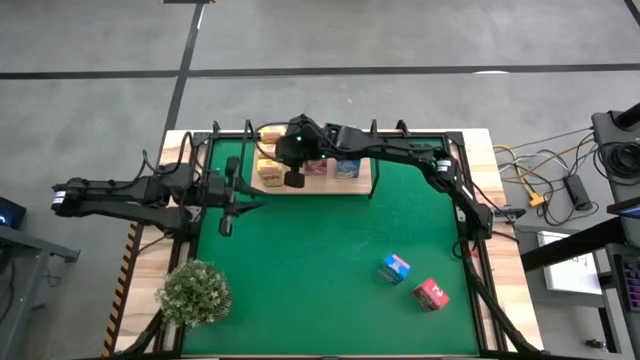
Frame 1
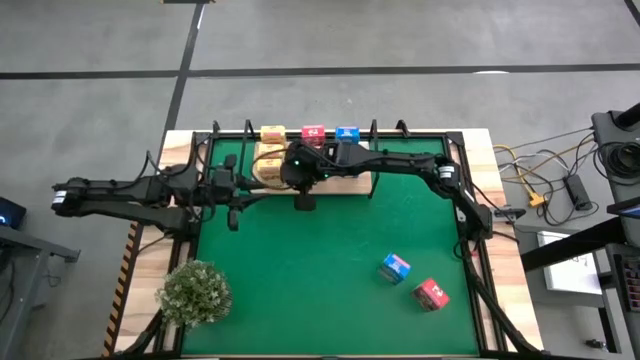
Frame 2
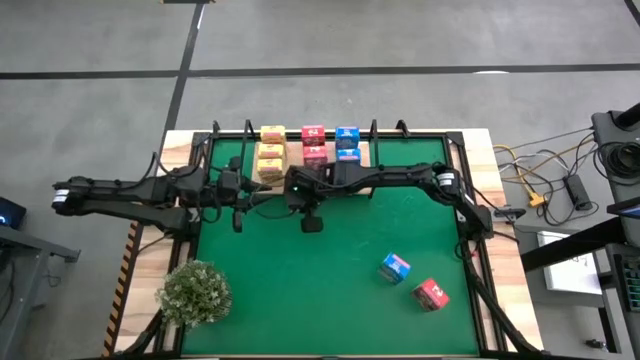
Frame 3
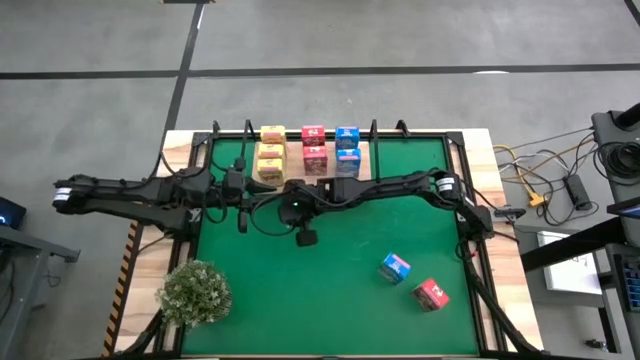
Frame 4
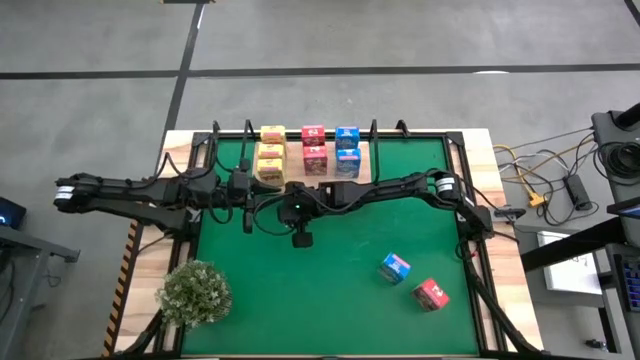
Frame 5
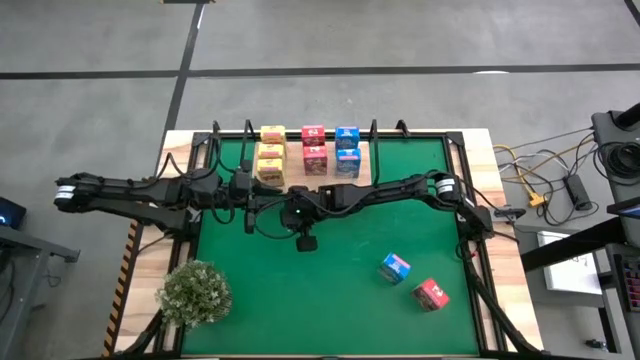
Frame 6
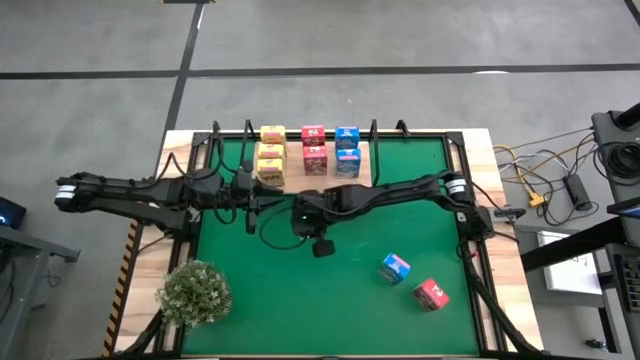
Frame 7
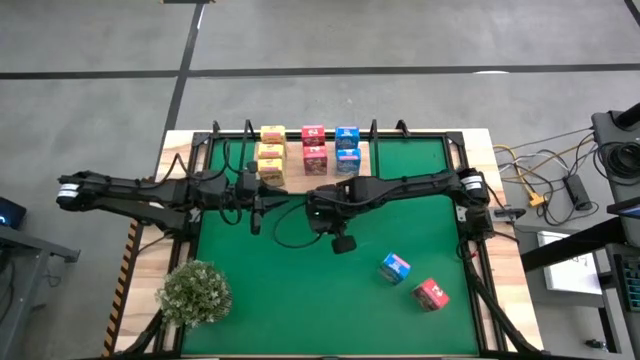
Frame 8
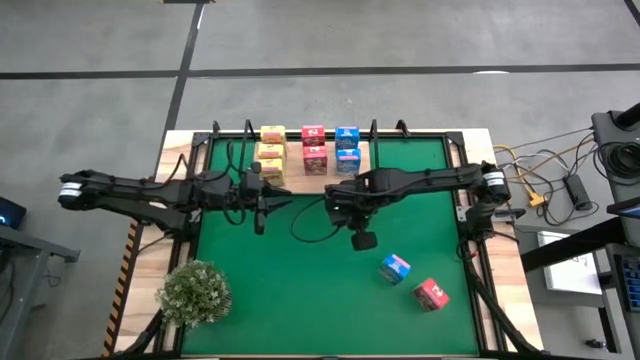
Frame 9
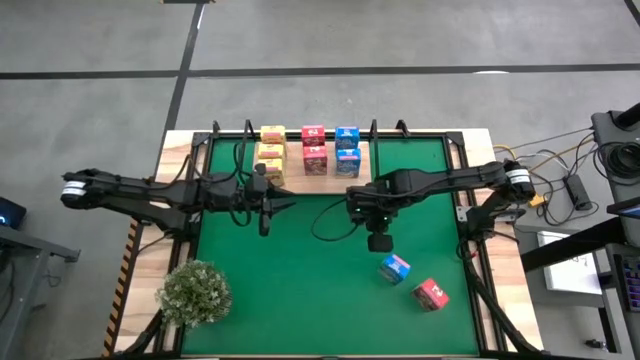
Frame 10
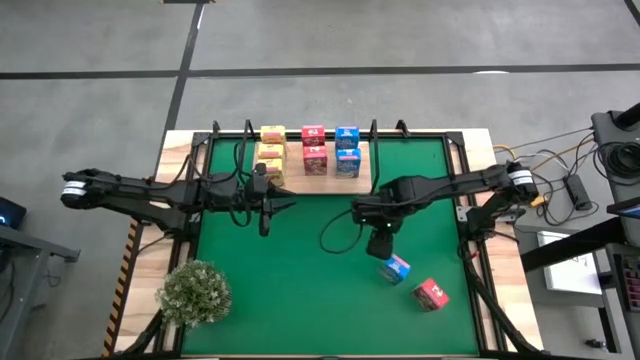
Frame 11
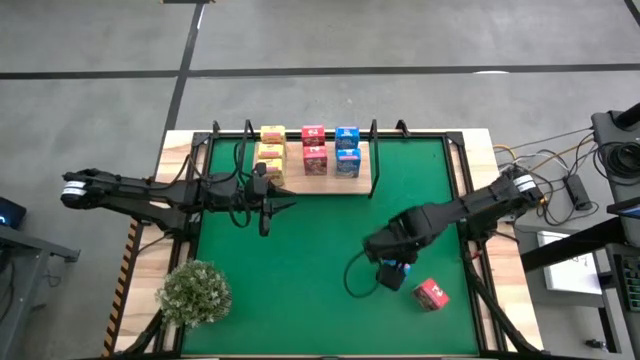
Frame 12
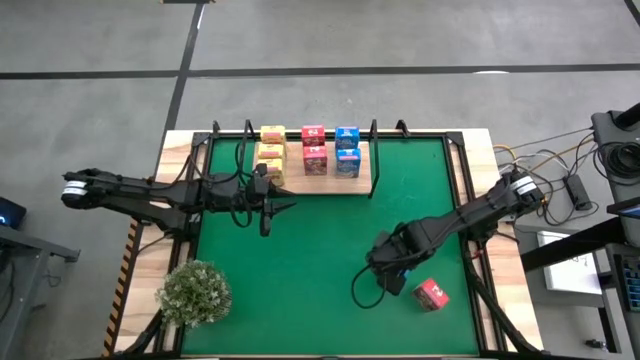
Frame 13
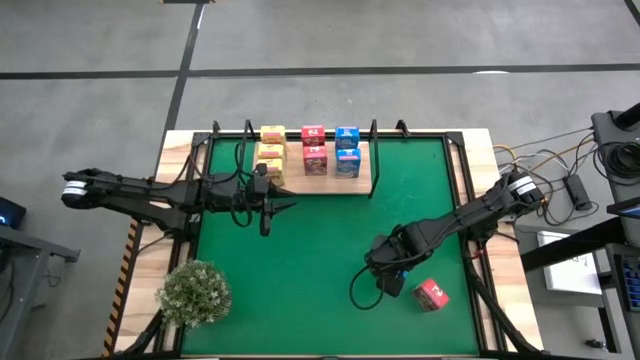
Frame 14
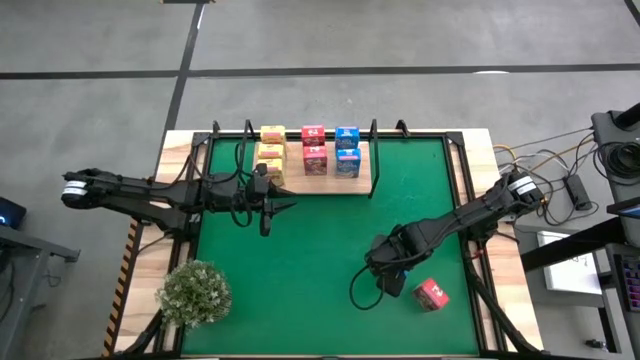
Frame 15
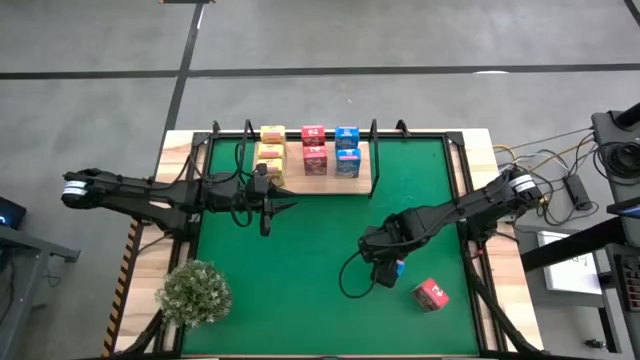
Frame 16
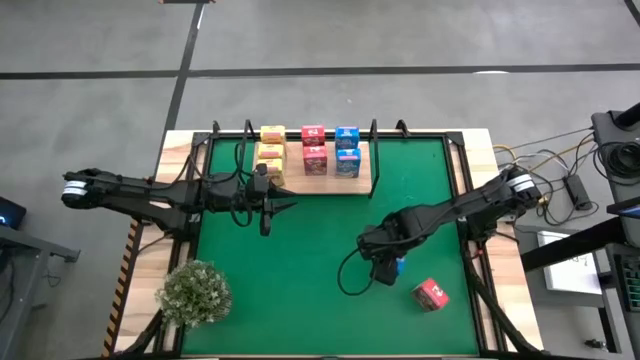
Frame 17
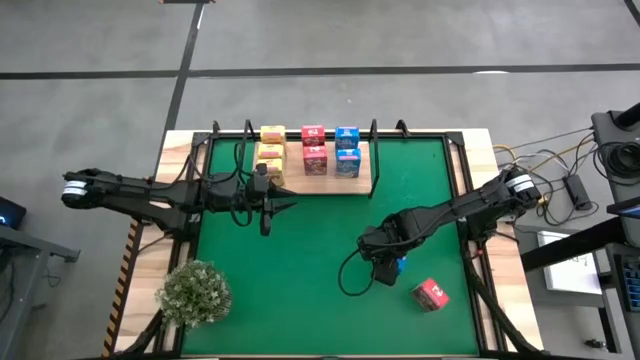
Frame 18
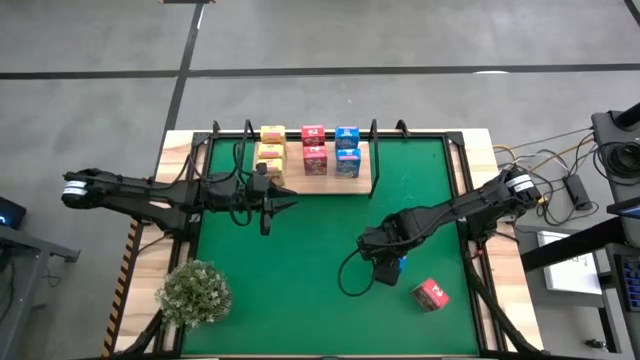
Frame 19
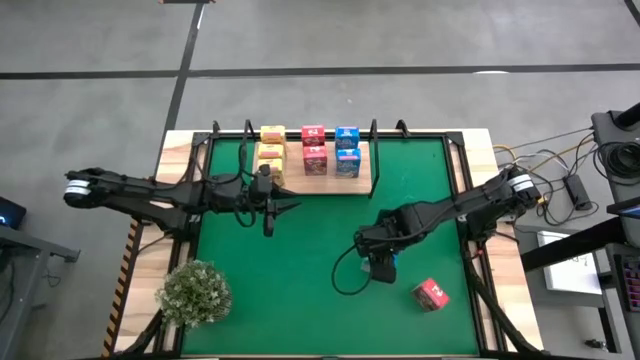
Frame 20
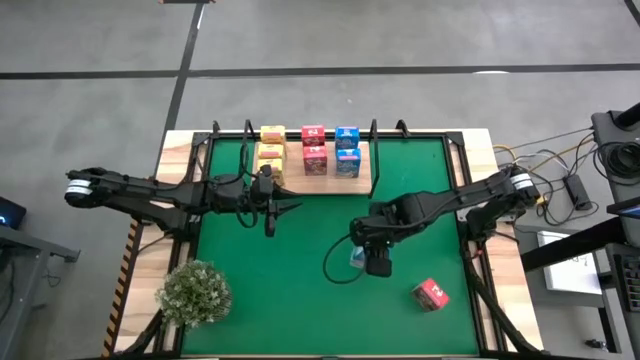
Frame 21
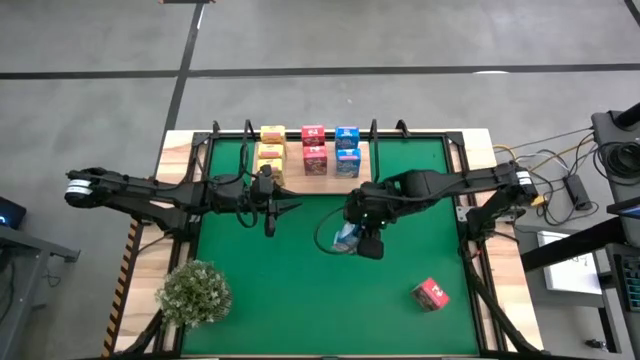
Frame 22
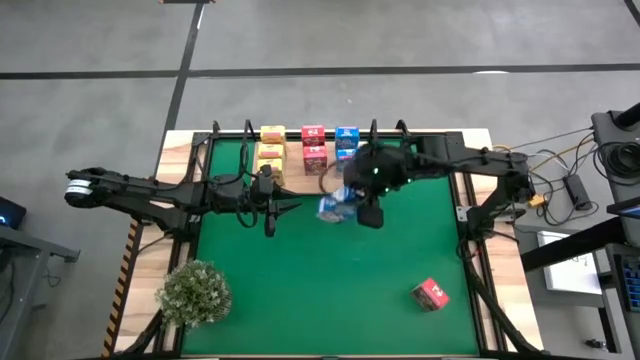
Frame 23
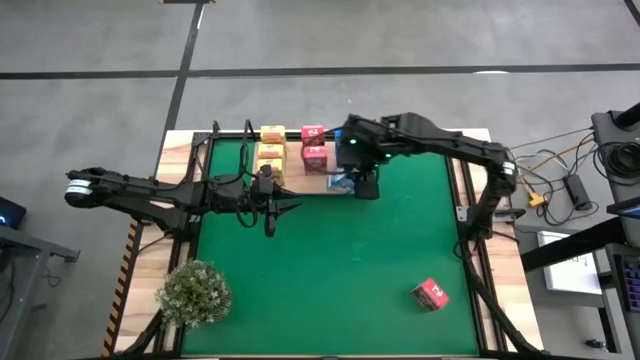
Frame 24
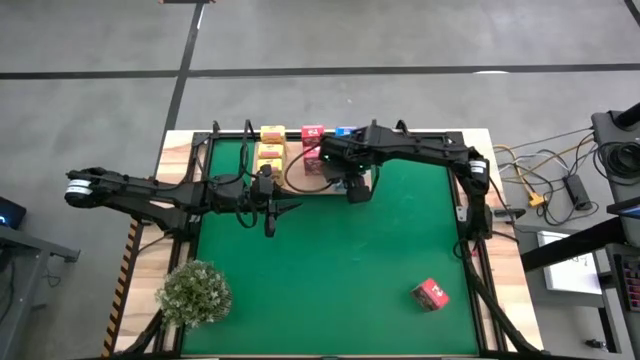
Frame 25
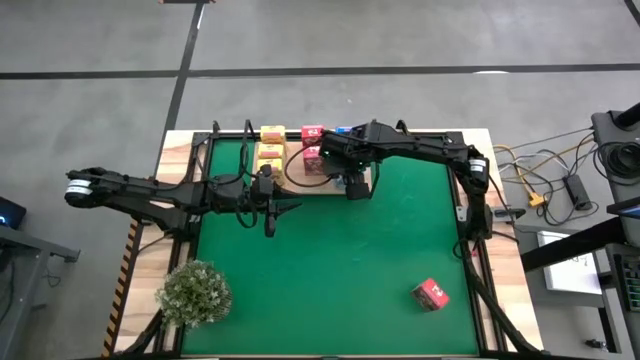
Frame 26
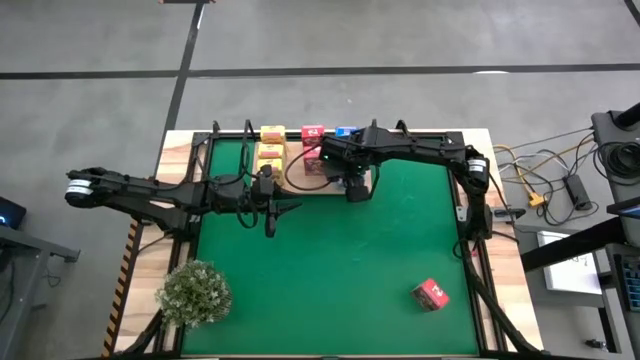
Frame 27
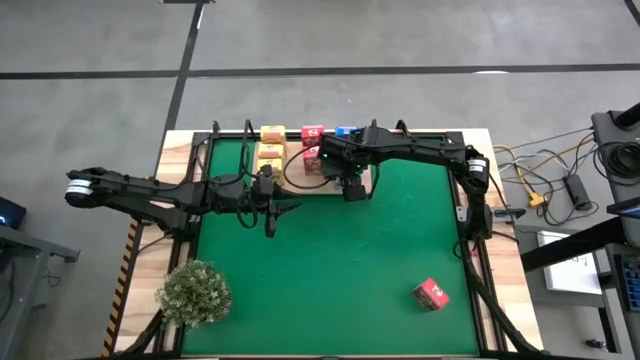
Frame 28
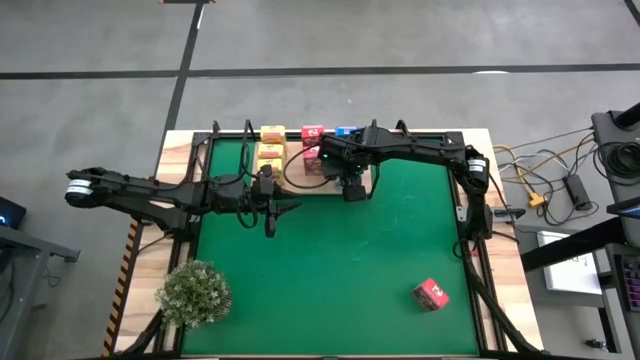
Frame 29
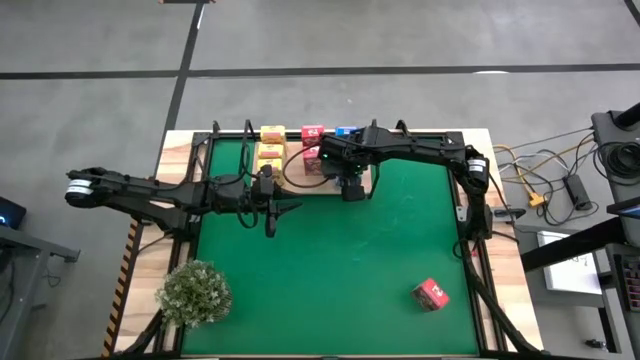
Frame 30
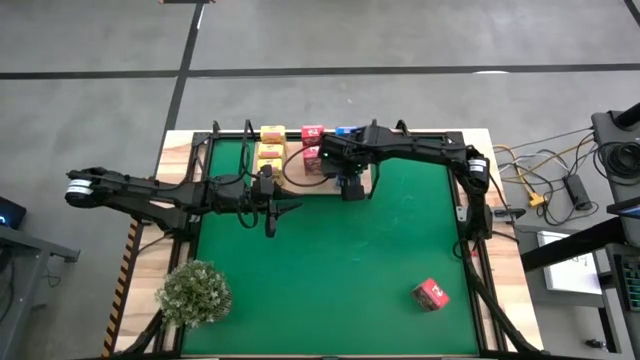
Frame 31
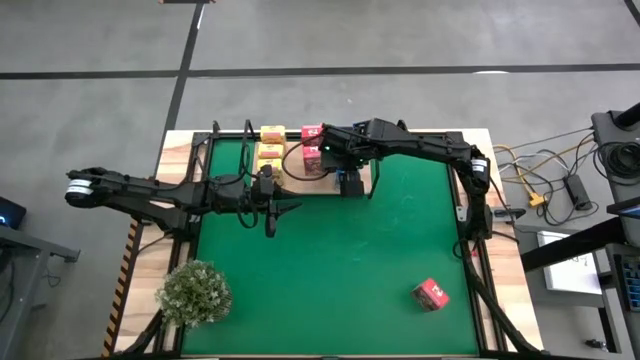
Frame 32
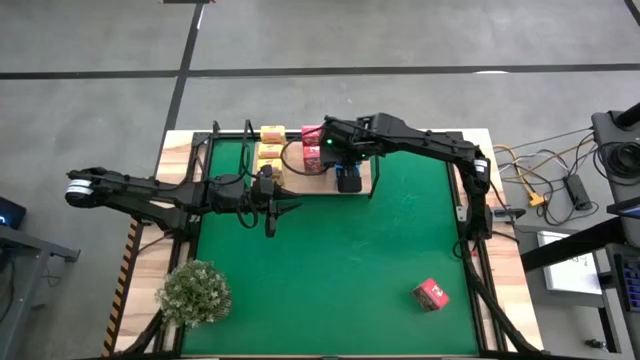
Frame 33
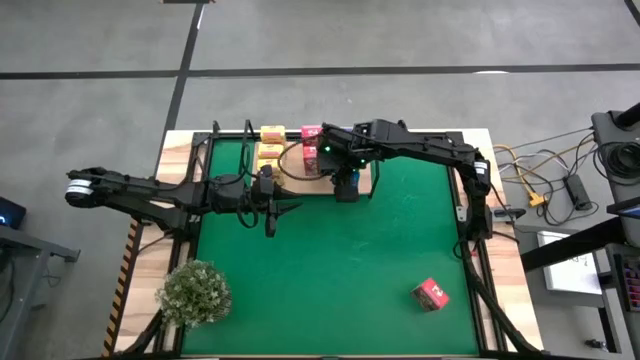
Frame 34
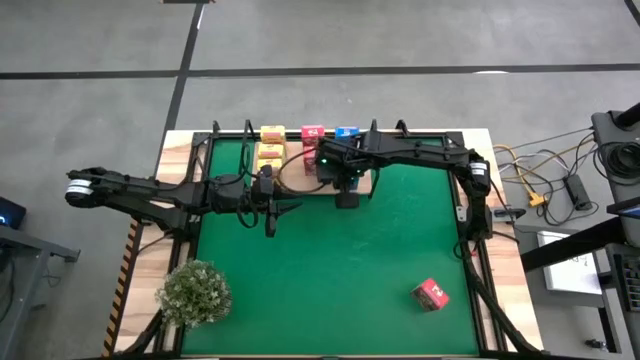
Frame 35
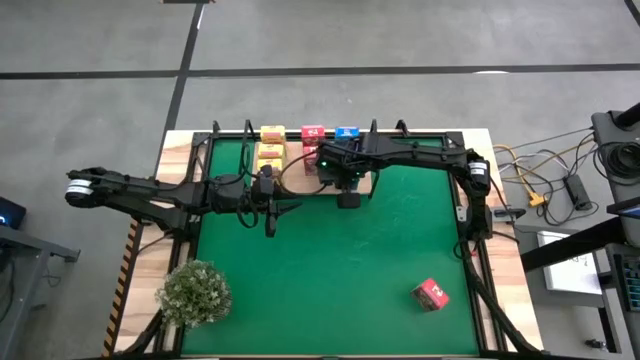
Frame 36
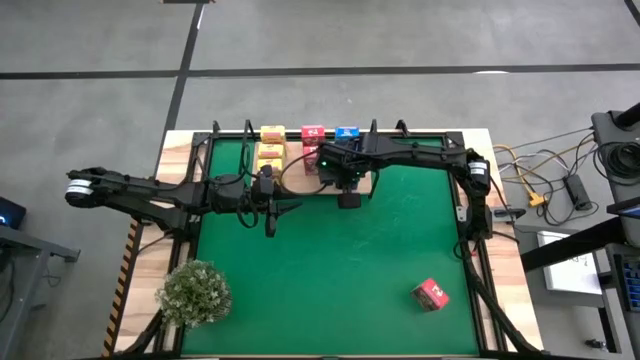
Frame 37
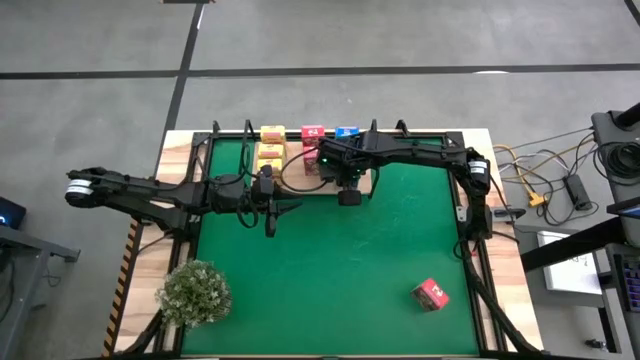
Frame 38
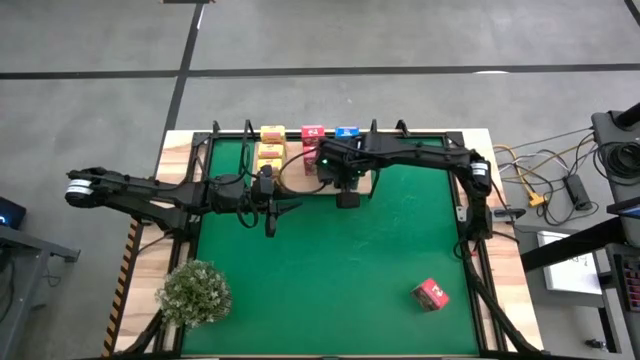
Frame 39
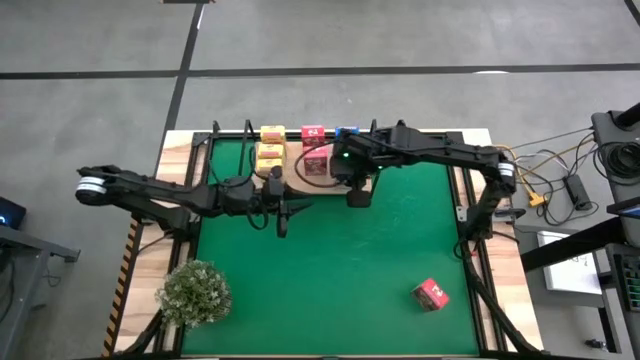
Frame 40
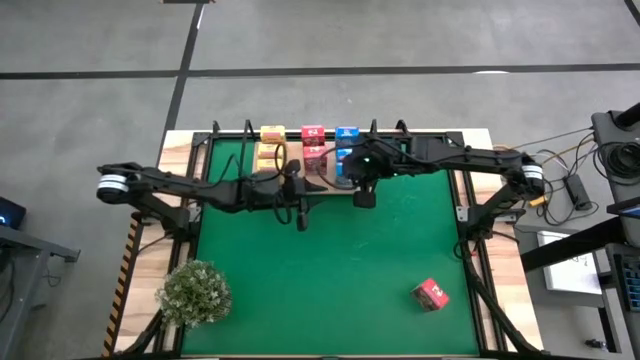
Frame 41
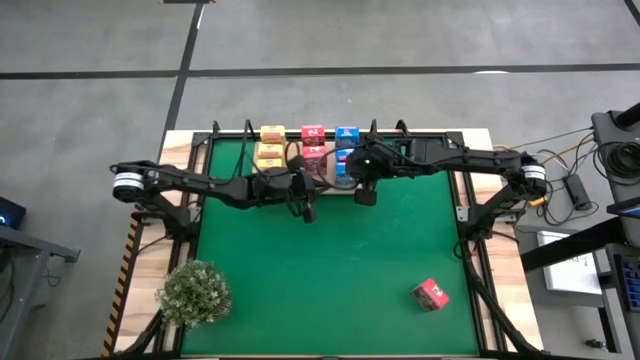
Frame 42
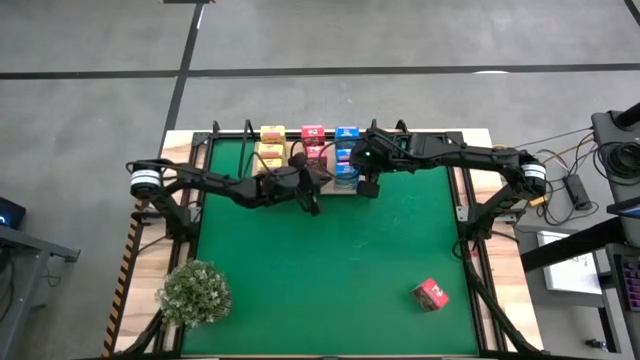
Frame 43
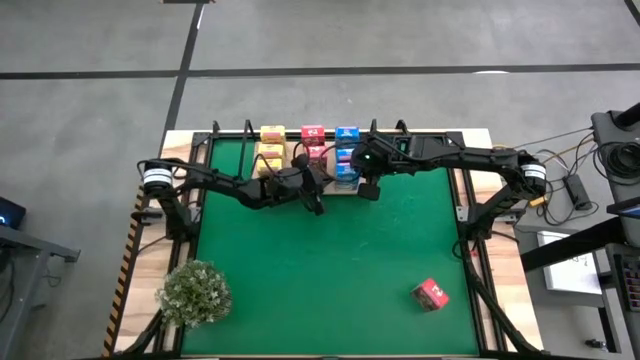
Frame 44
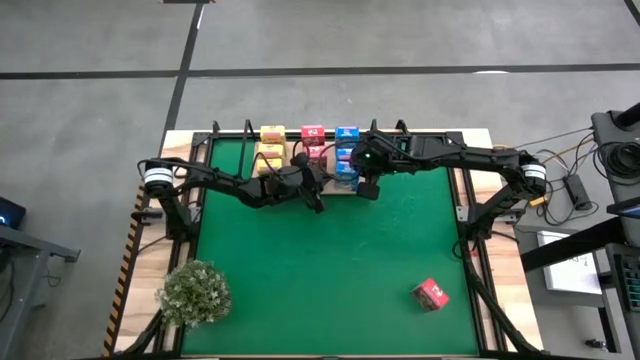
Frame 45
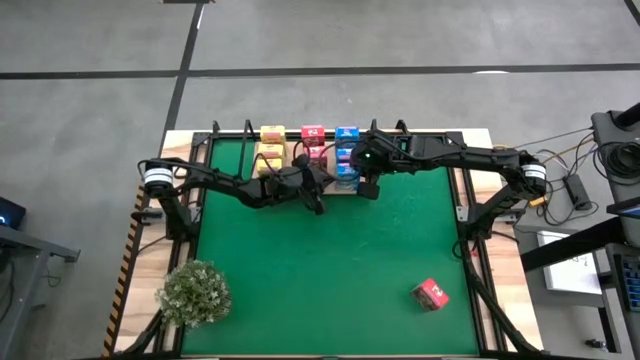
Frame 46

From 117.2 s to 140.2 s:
Task: Stack cereal on shelf
Put the blue cereal box on the shelf aligned with the other blue cereal boxes
